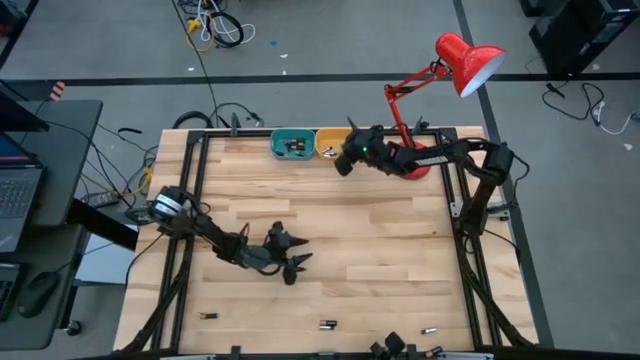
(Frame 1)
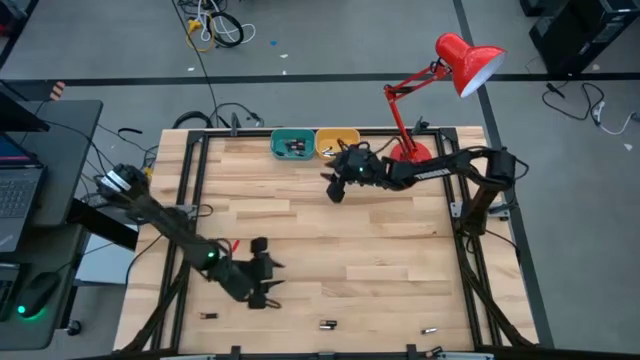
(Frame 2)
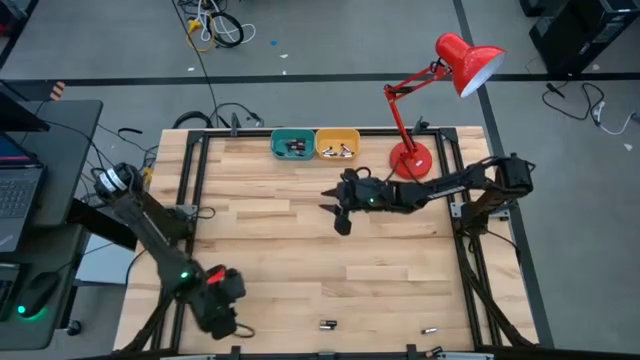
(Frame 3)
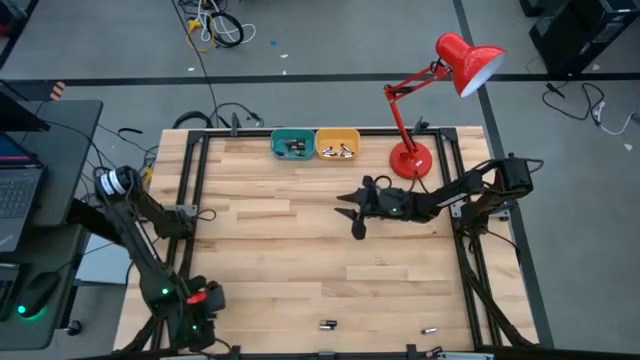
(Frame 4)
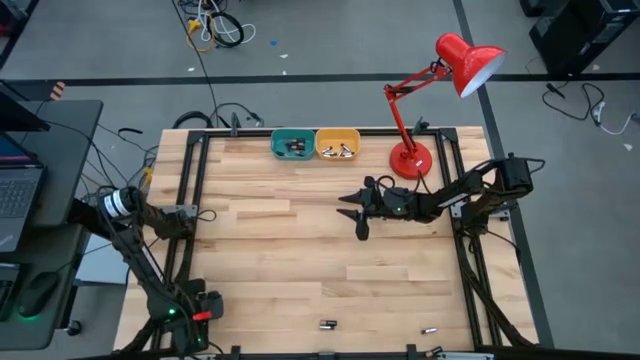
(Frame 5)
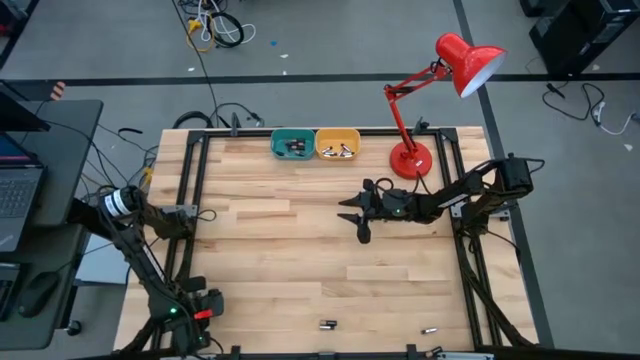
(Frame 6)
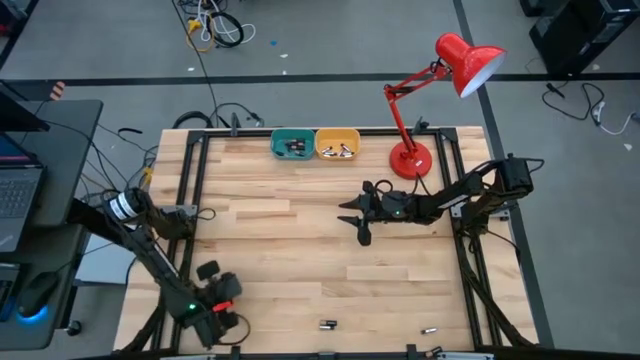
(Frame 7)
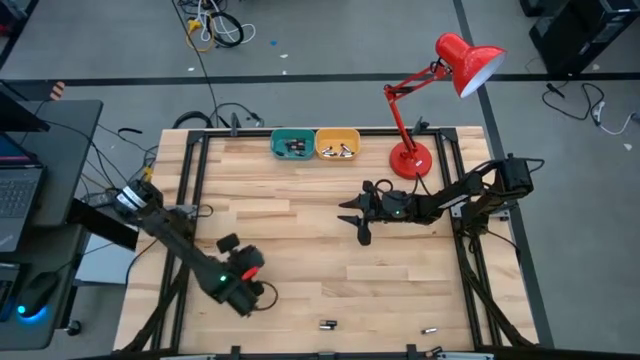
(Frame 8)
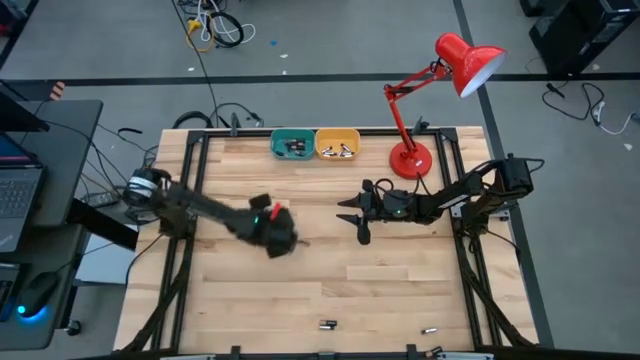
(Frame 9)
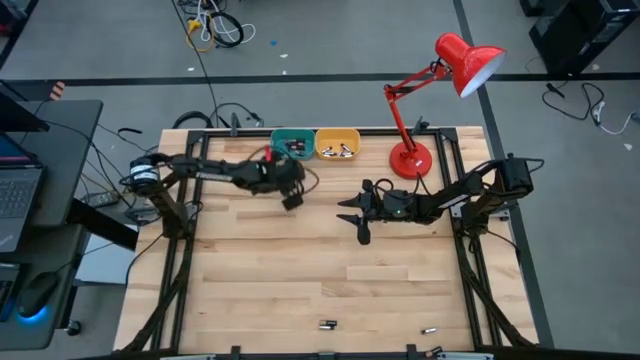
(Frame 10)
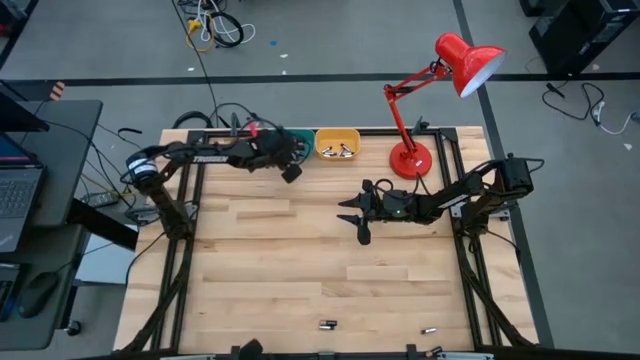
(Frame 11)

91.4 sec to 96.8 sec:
Task: Sort batteries
Put the black battery into the blue bin

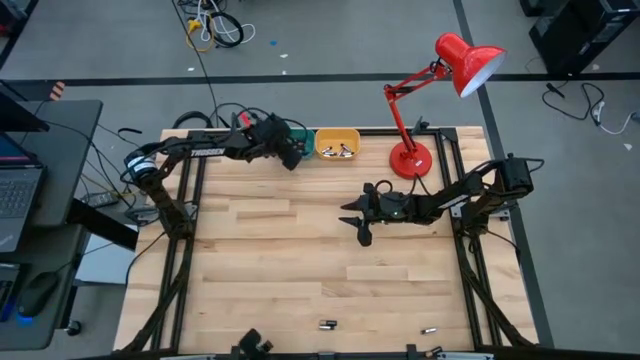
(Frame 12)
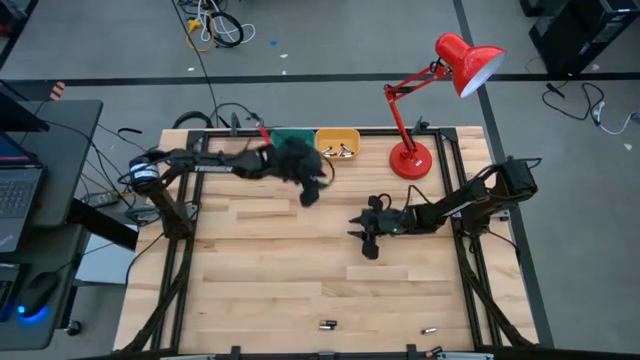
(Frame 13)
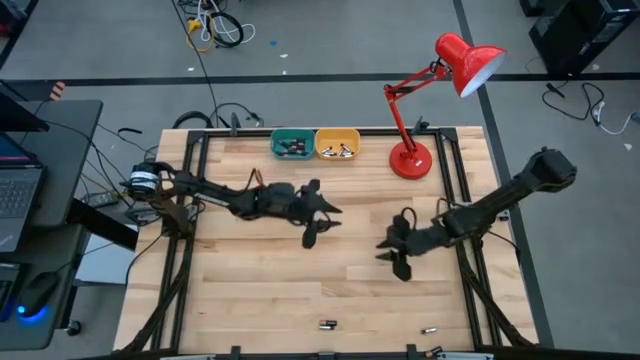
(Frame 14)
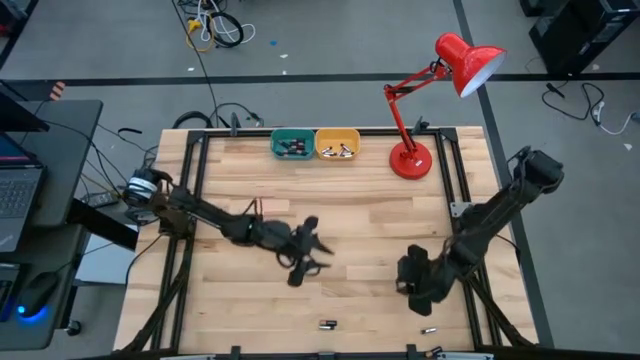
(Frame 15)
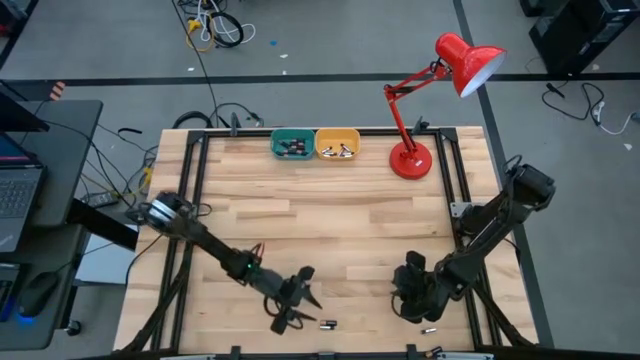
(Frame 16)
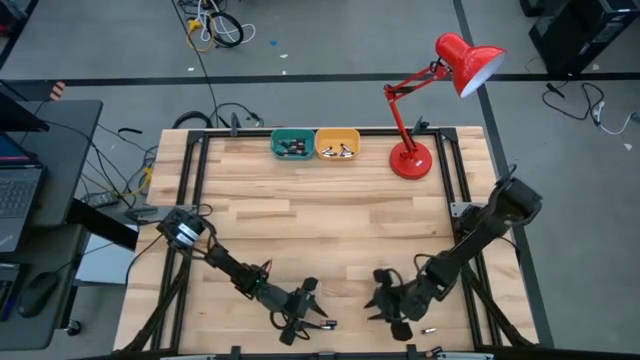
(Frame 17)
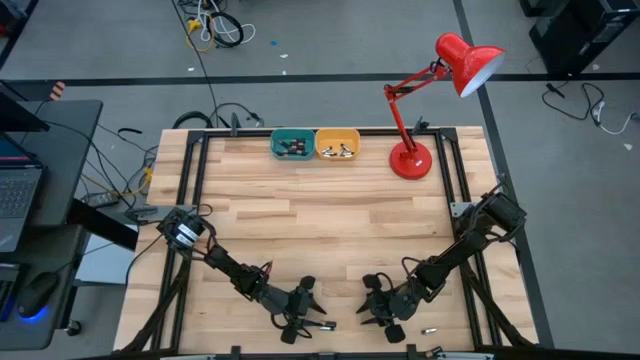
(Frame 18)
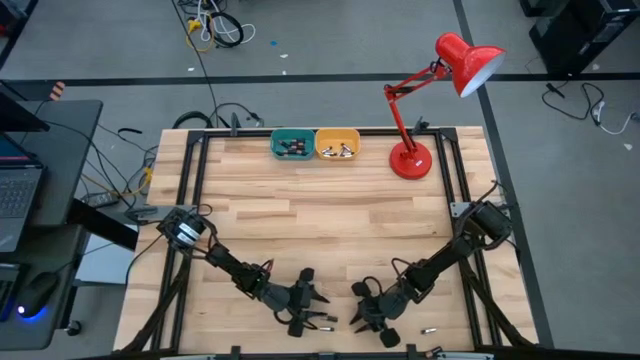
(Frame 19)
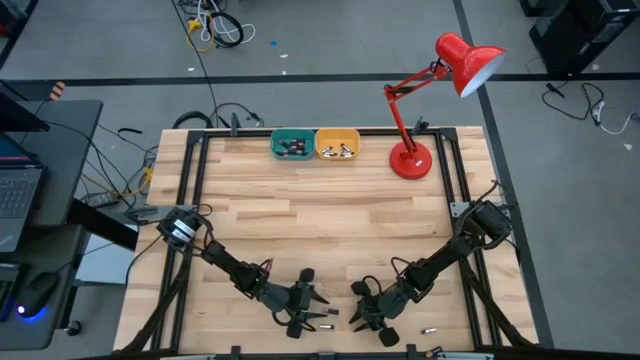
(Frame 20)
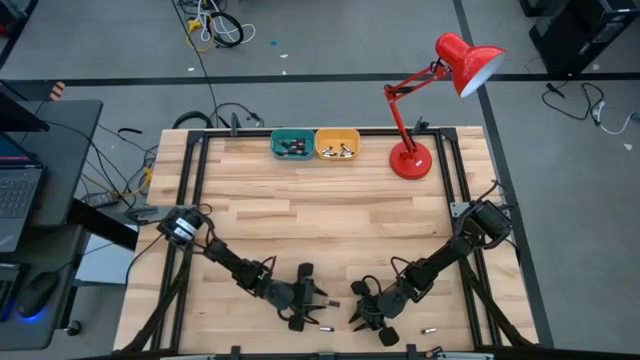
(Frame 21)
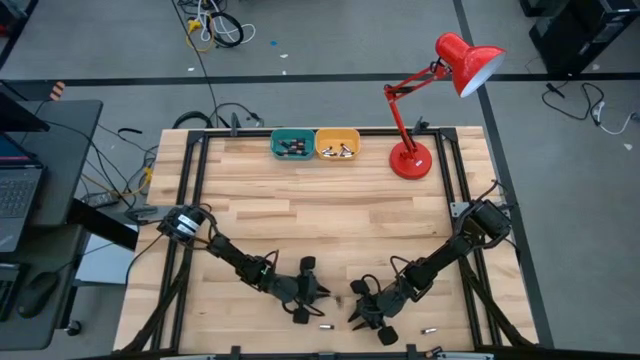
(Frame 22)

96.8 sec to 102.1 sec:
Put the black battery into the blue bin

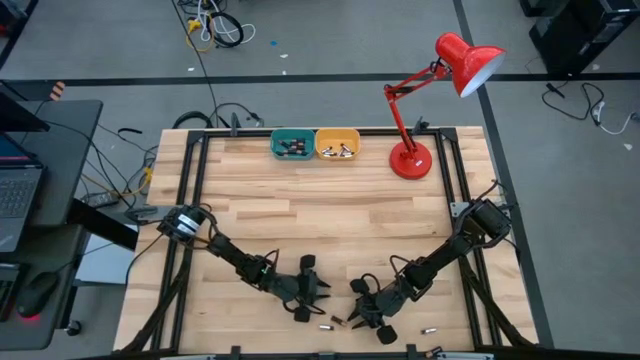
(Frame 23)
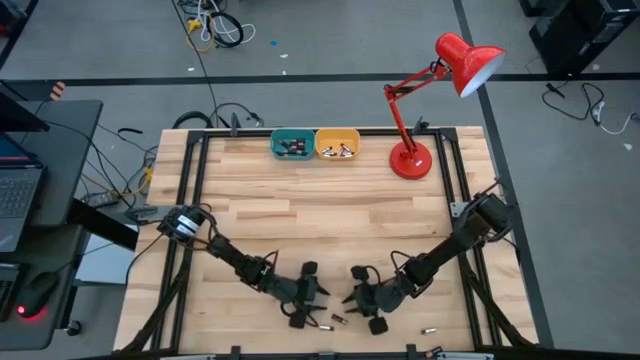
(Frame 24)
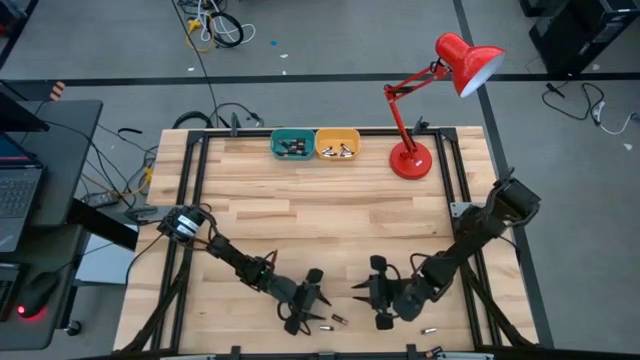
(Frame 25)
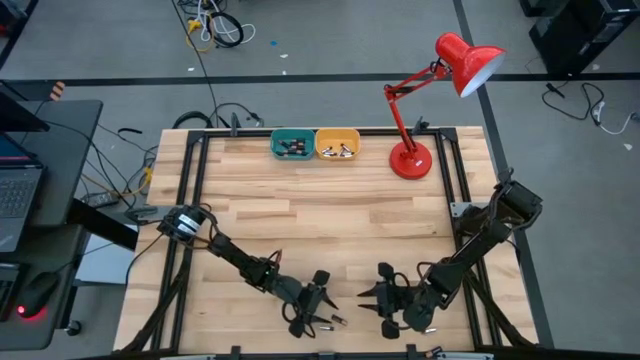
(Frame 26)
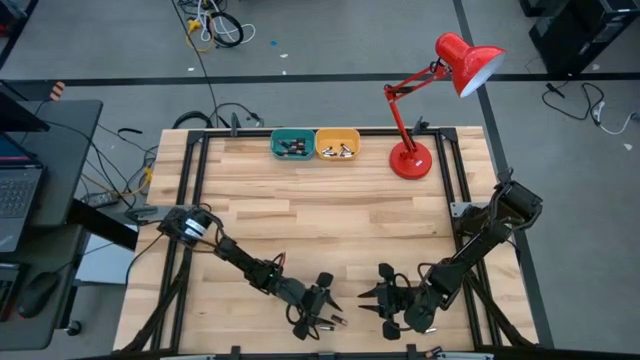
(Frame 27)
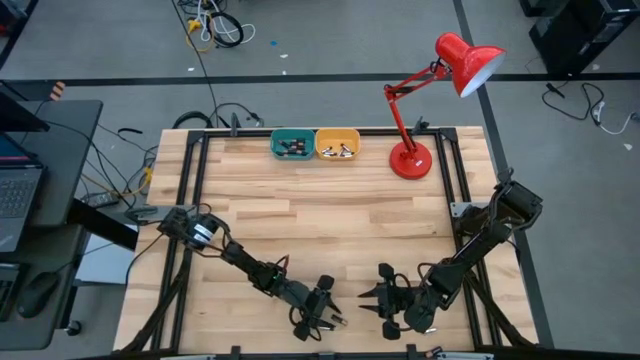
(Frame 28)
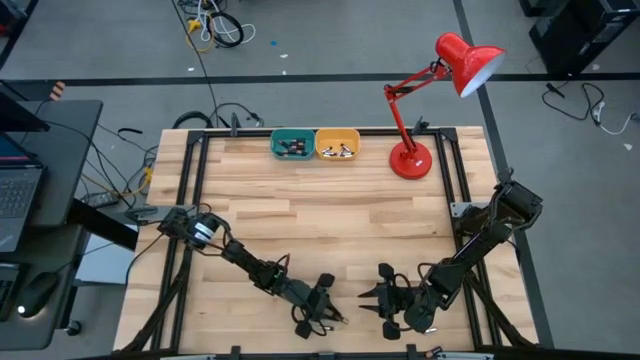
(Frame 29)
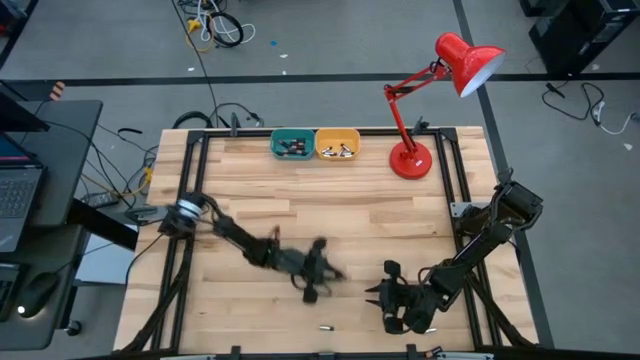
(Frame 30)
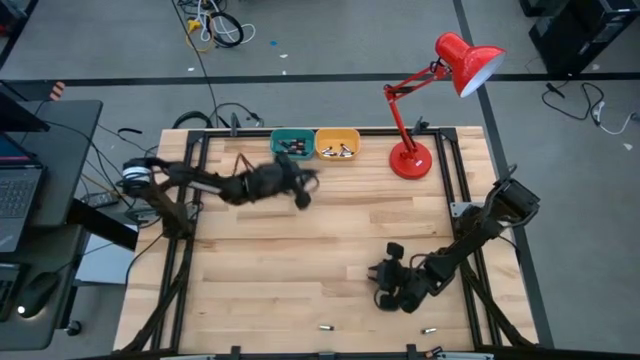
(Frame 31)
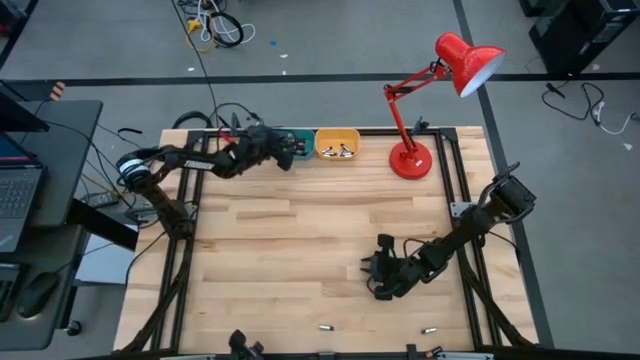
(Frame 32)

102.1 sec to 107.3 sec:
Put the black battery into the blue bin

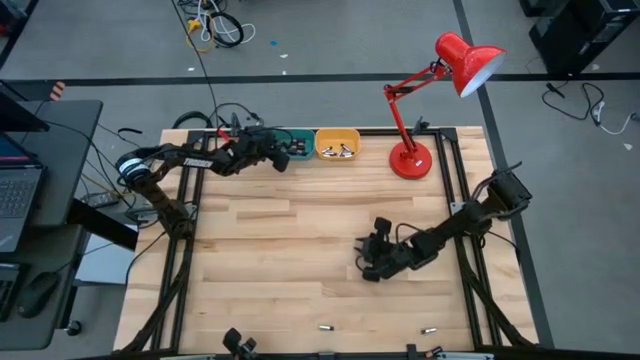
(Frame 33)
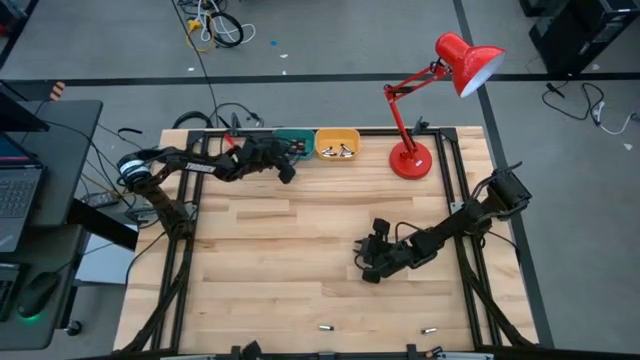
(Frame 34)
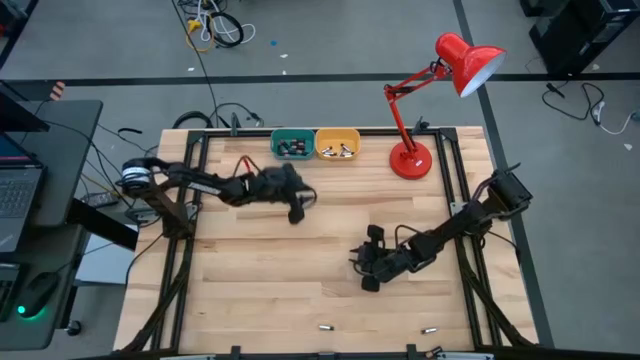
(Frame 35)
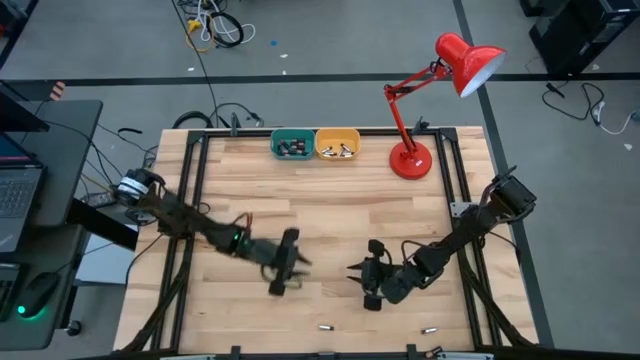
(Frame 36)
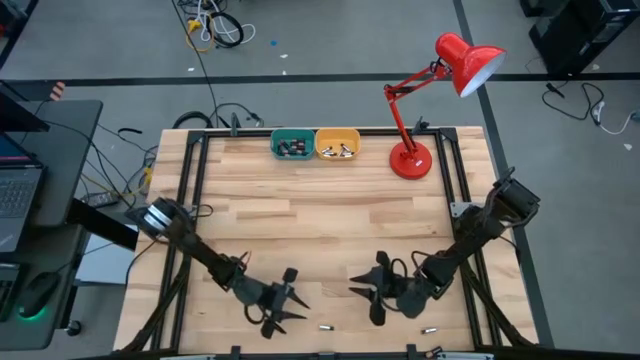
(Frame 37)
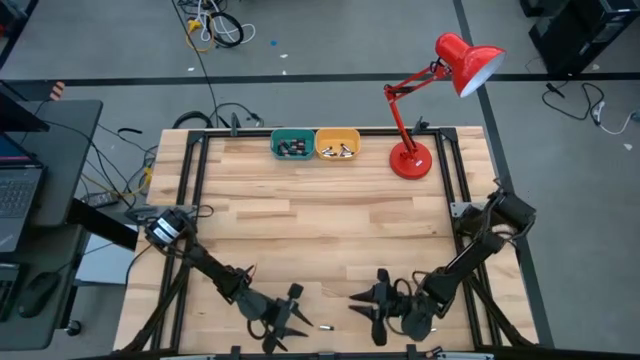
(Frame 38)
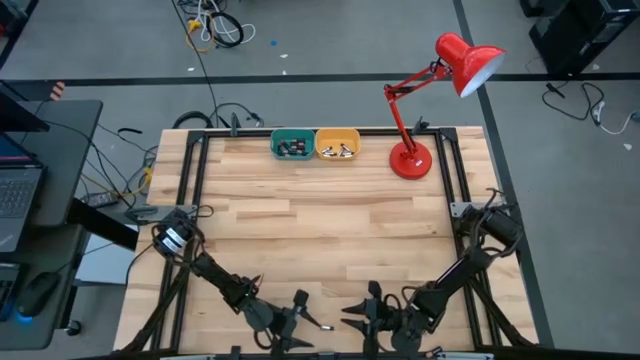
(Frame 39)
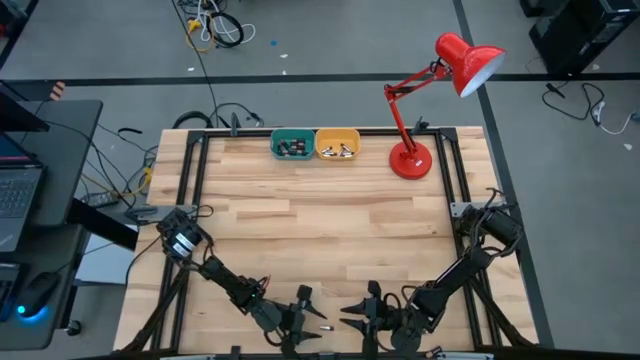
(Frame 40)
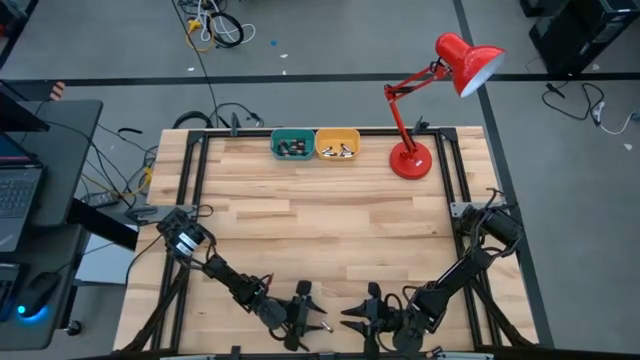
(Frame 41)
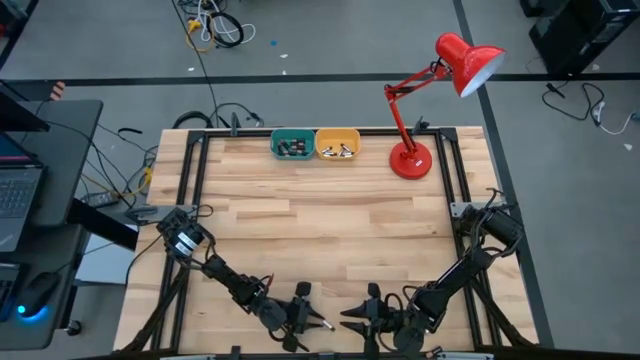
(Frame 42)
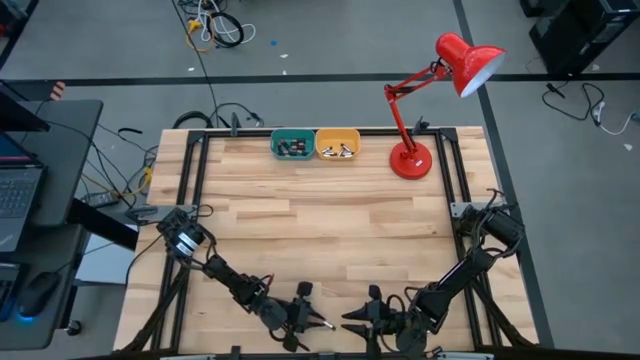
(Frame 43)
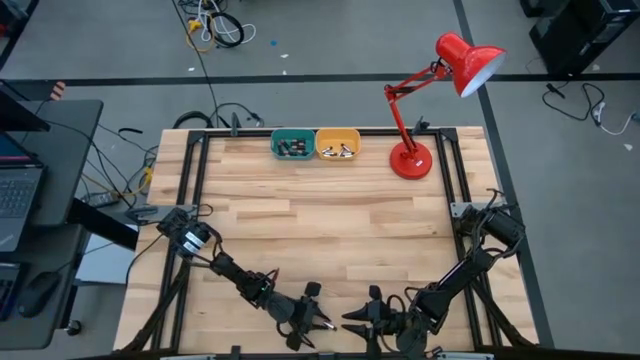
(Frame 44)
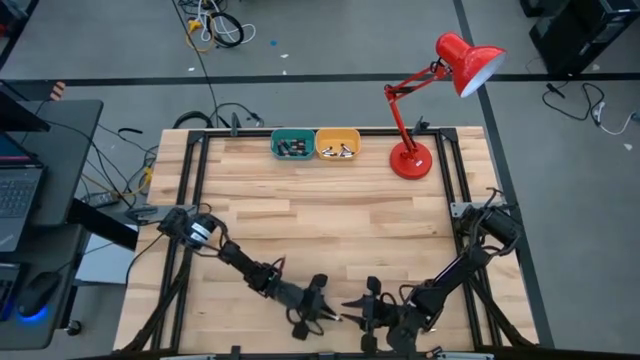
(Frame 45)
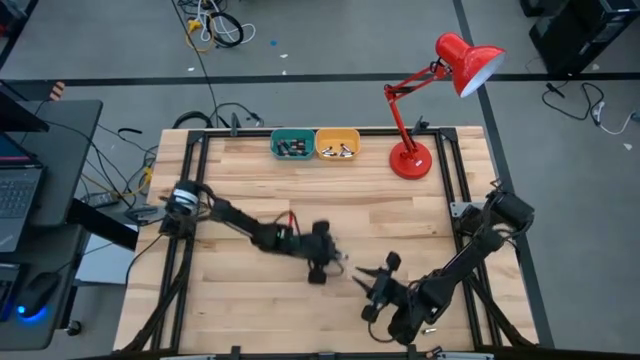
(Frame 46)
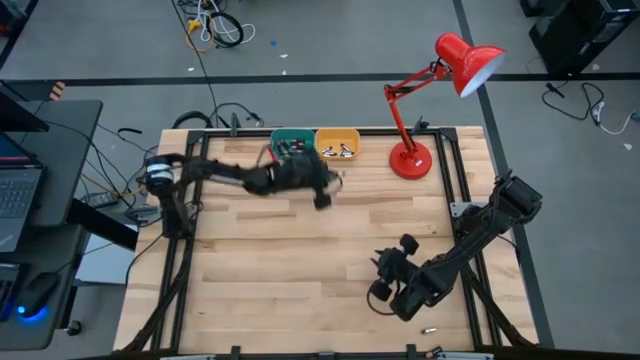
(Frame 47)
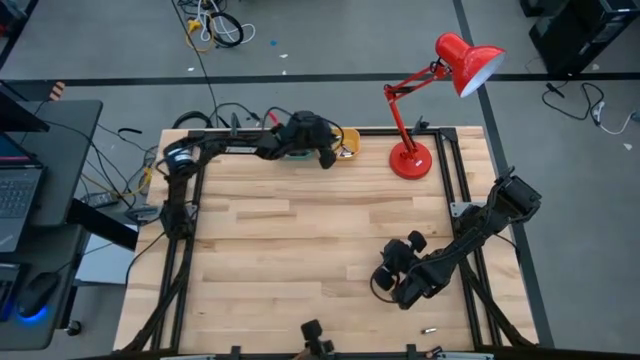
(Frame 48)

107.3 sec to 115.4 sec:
Put the white battery into the yellow bin
